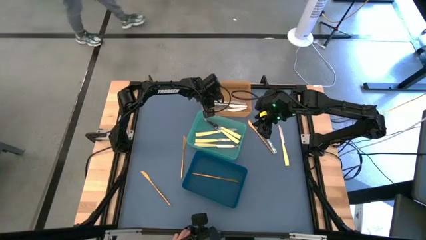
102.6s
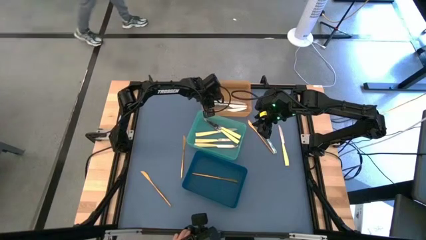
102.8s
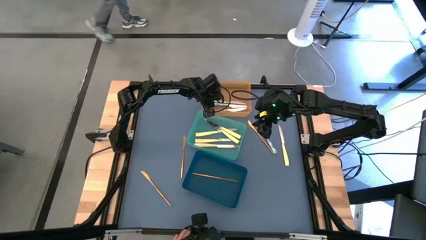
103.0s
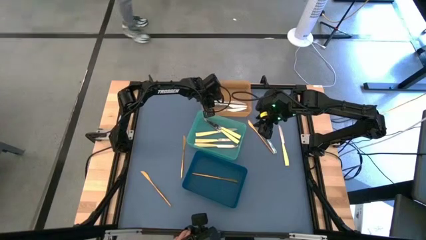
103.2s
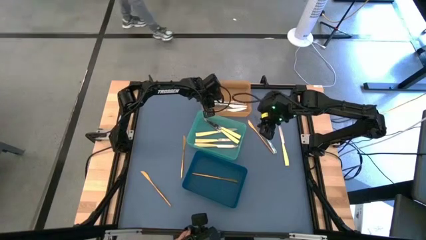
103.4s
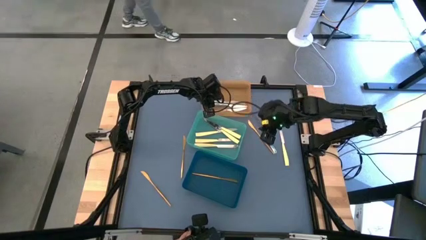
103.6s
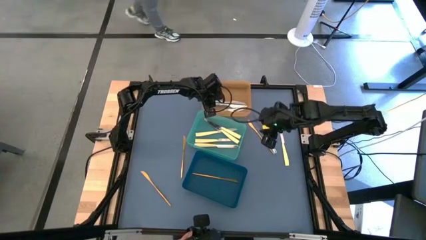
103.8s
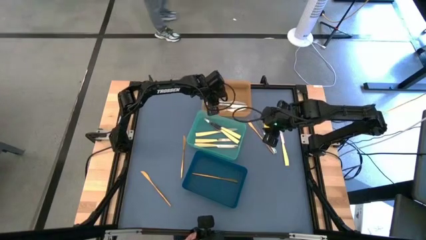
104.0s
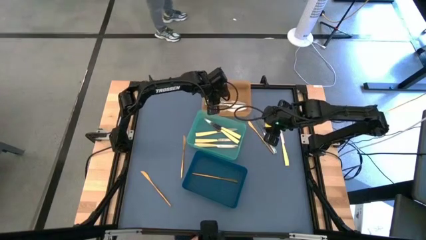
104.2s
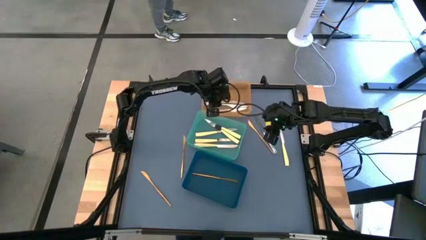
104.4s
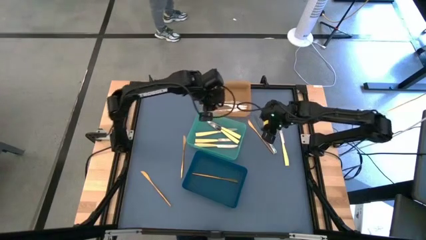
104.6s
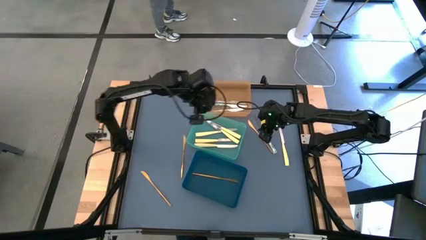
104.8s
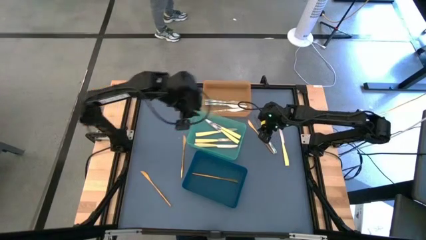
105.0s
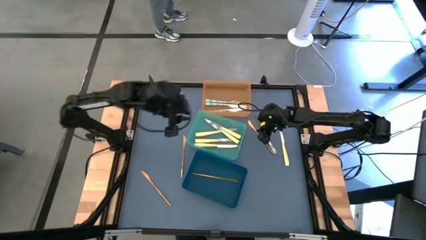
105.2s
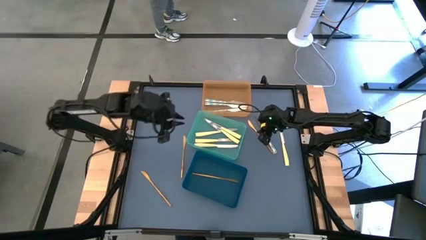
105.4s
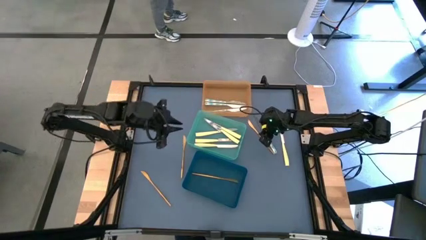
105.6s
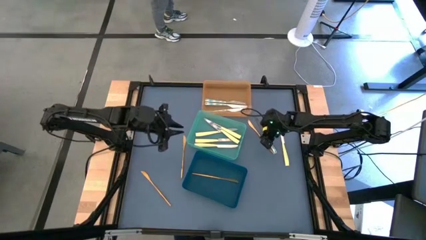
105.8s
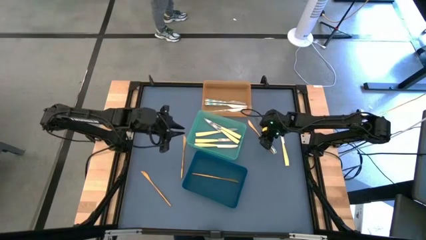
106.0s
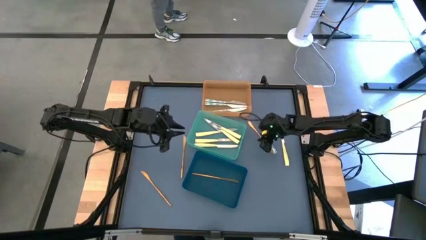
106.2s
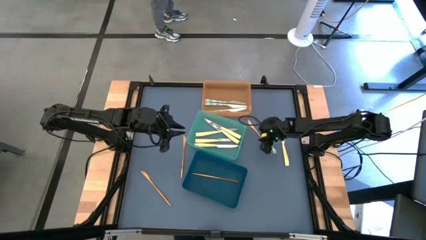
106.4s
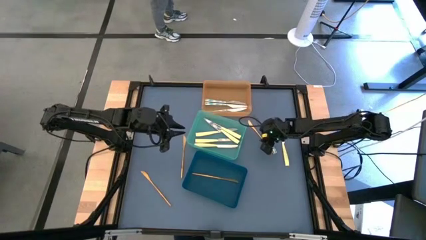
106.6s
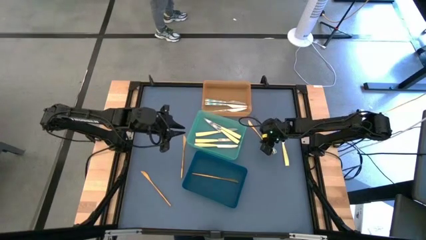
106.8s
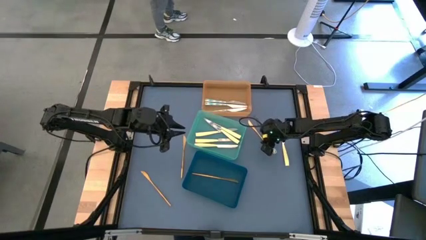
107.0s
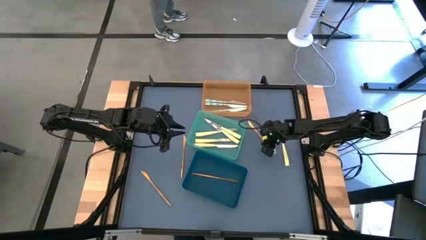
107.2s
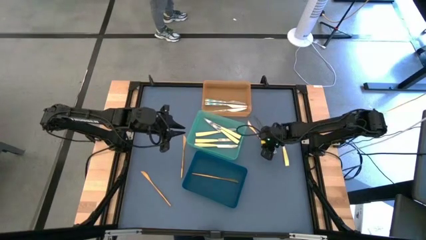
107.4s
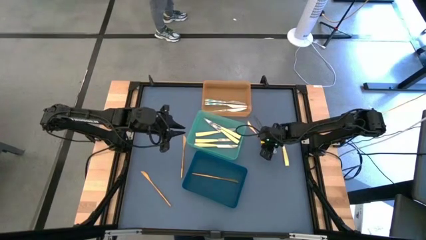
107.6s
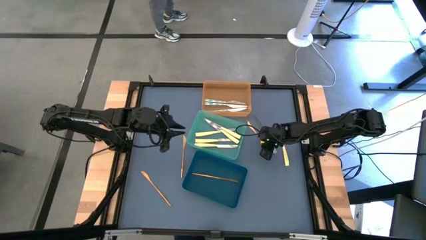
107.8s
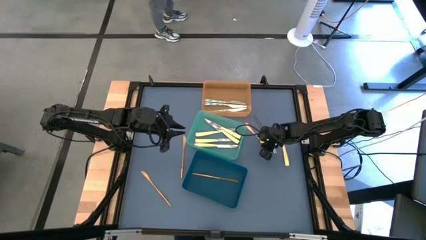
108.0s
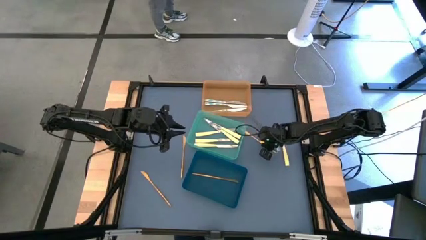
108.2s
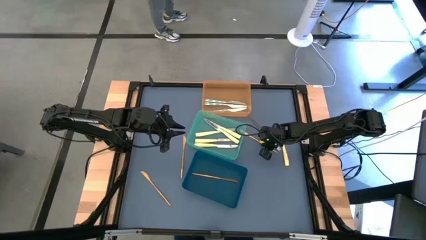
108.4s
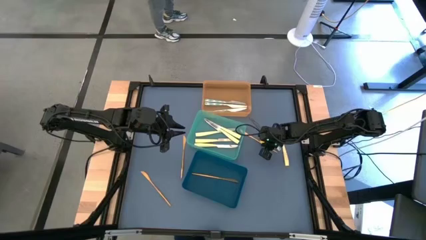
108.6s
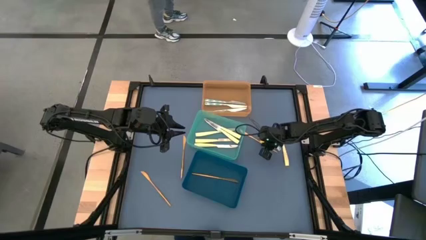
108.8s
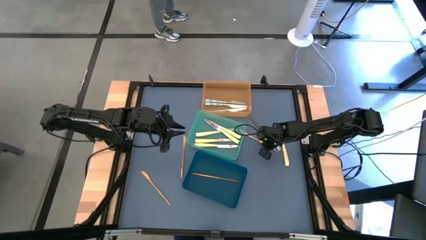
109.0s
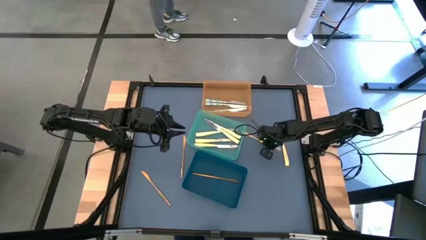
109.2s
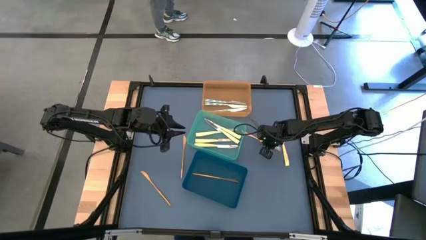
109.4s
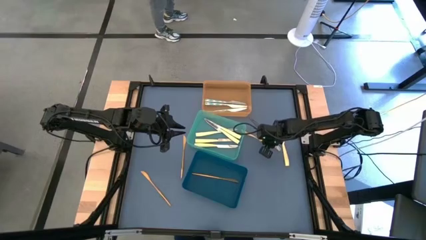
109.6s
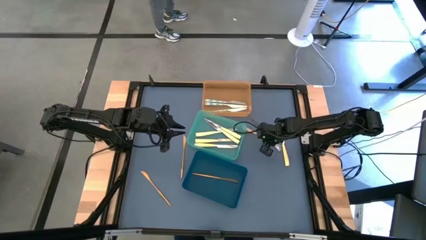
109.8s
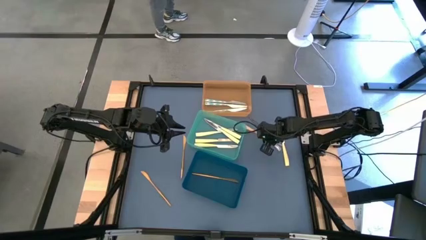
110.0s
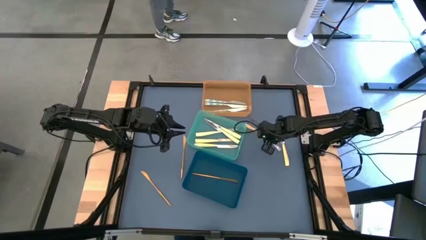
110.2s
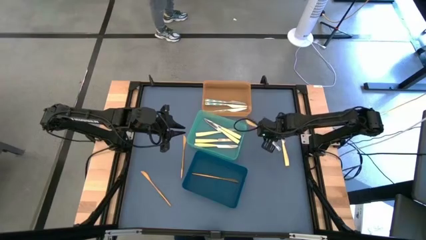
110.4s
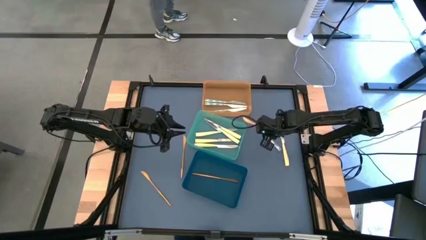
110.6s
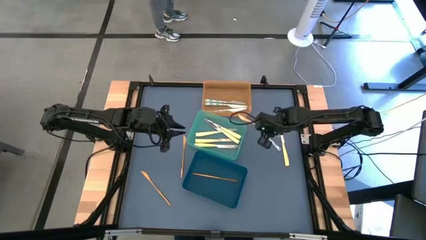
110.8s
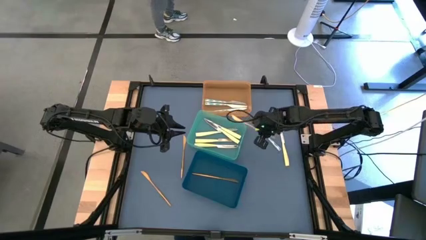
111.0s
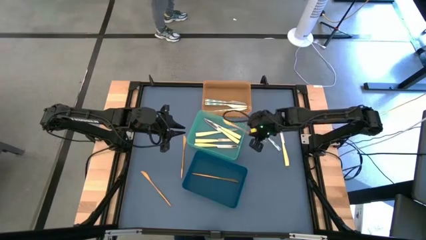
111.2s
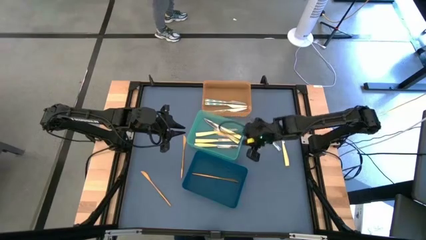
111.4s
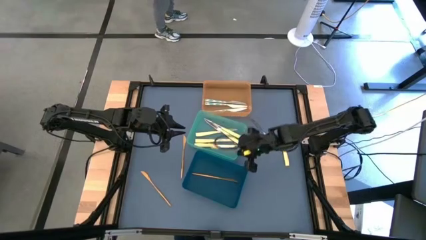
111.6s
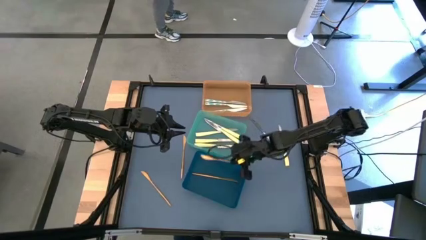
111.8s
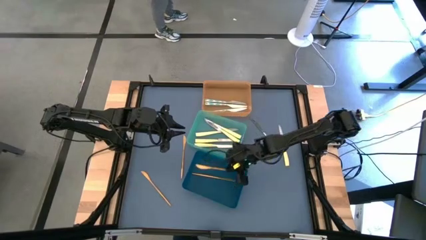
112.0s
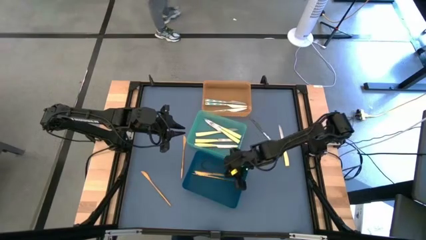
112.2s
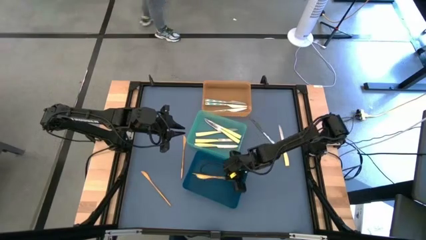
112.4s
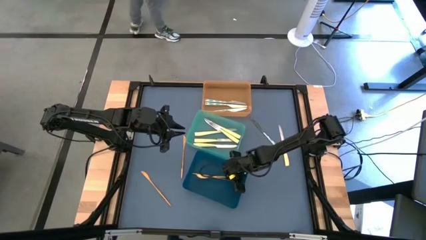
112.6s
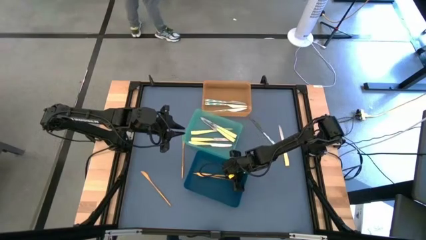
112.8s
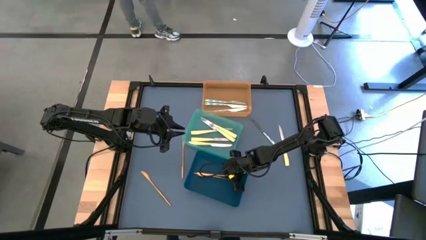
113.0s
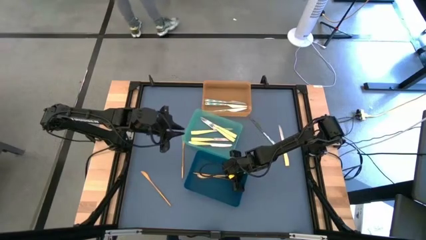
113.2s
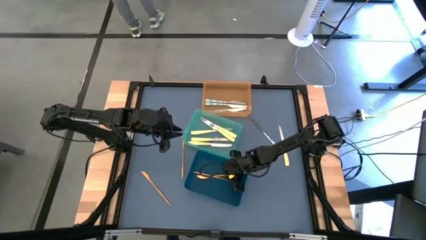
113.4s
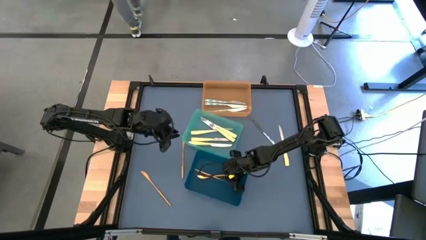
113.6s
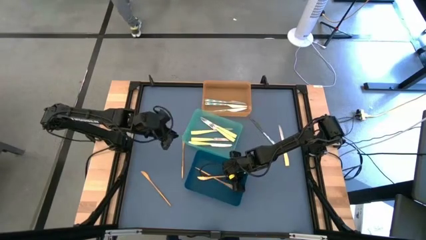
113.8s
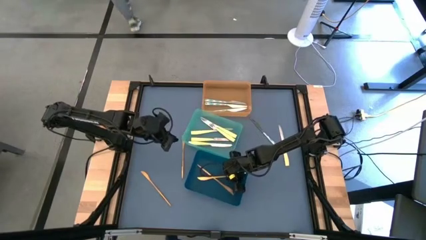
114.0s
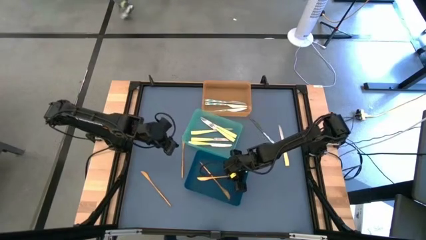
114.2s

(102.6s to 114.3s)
Task: Sort silverware by color (type)
Put the golden knife into the blue bin

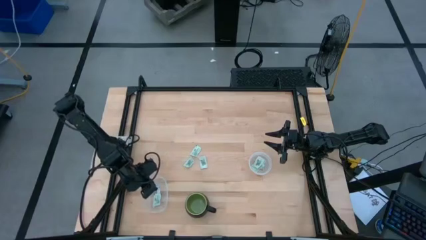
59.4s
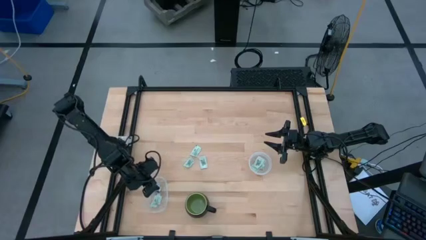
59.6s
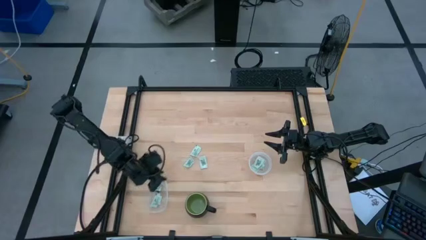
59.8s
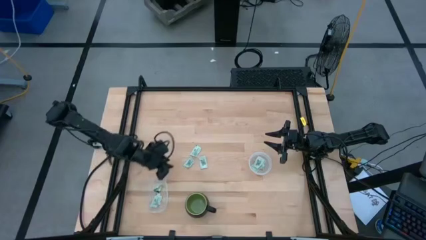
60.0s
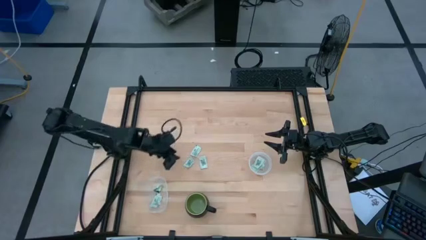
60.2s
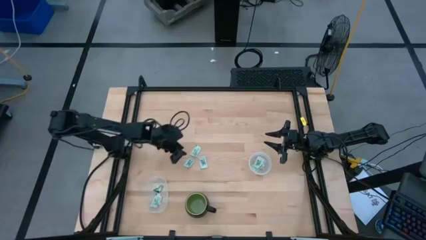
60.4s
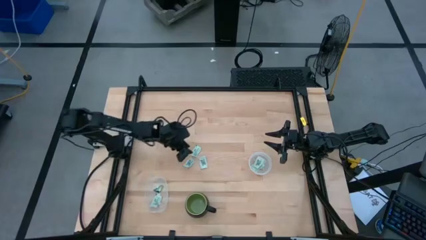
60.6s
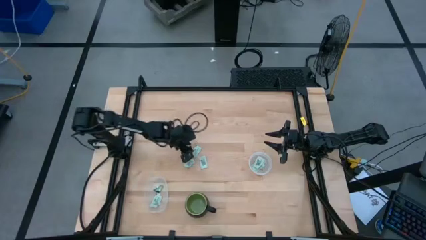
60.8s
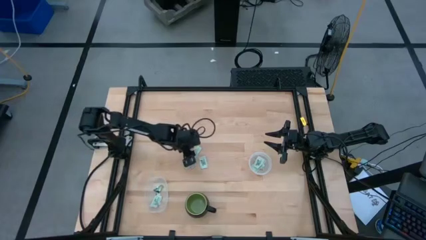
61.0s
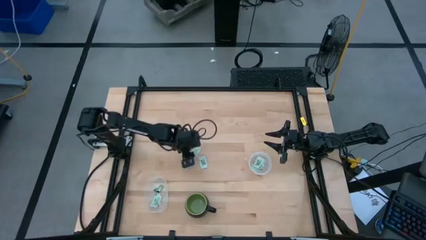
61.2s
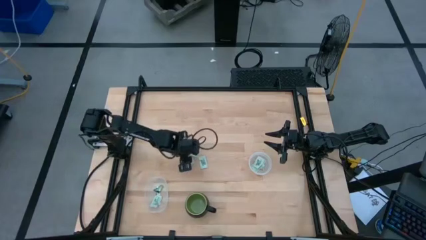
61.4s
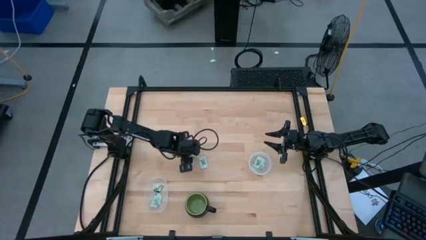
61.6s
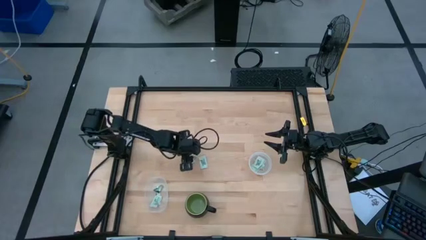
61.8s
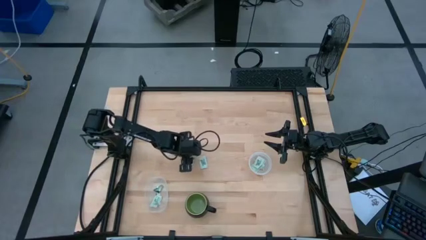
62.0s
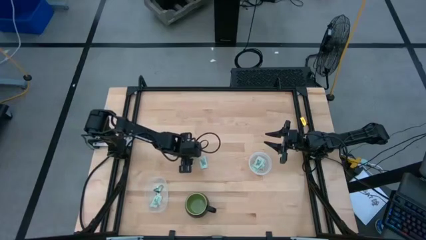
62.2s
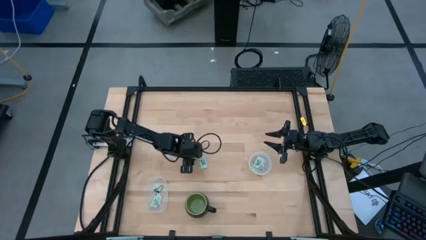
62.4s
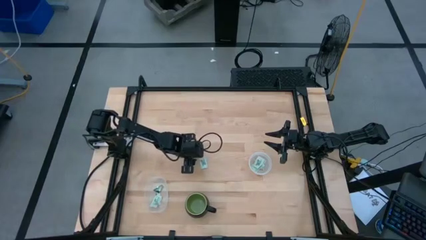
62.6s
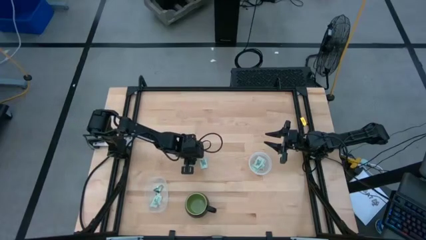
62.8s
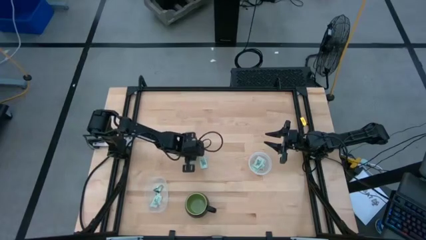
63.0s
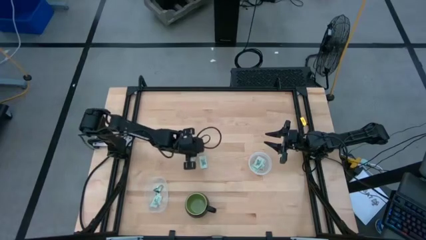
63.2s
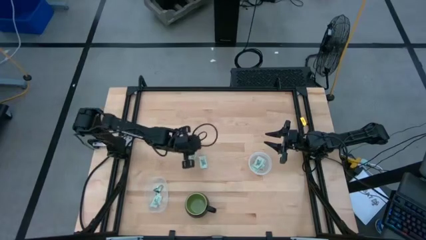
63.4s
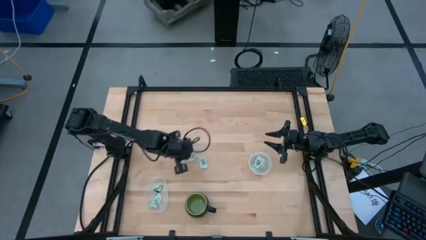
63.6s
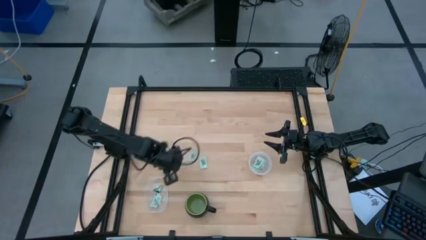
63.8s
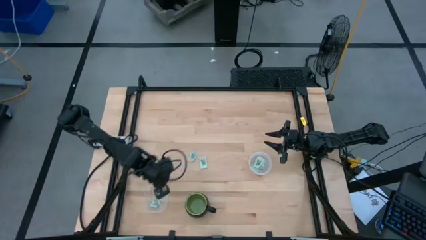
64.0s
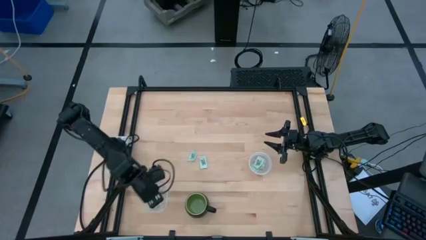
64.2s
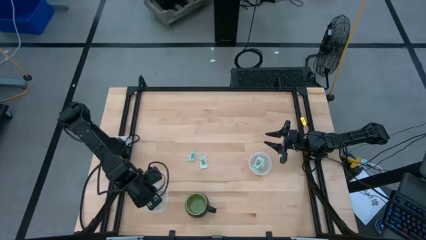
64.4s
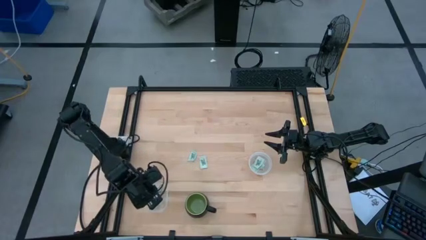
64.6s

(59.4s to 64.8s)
Task: Pick and place Stevia / Truvia into bins
Put the white stevia packet into the rectangular transparent container
